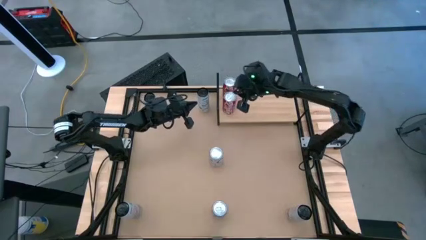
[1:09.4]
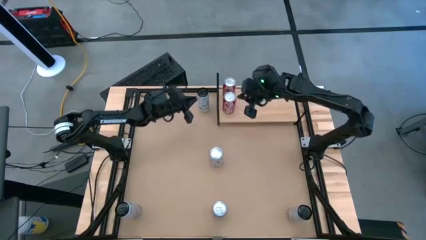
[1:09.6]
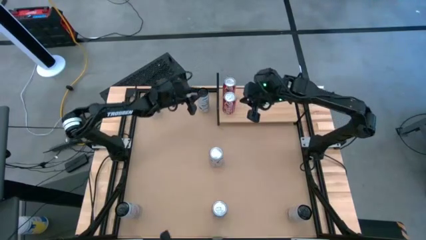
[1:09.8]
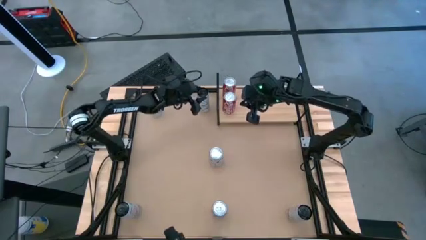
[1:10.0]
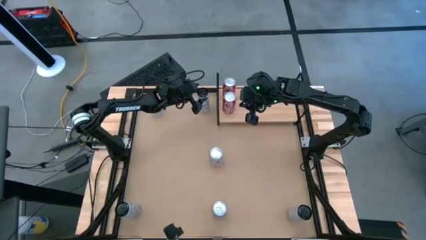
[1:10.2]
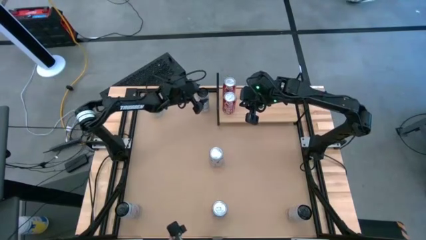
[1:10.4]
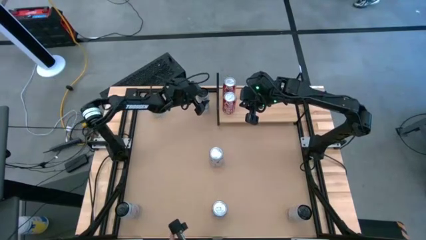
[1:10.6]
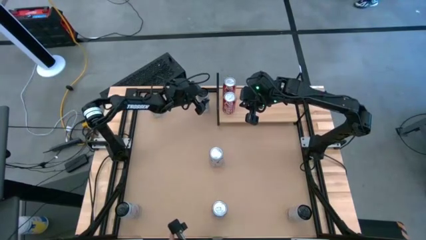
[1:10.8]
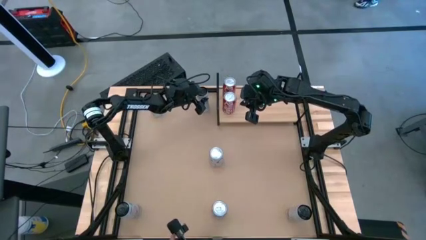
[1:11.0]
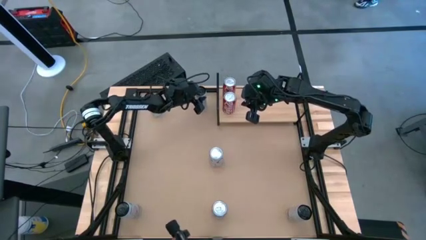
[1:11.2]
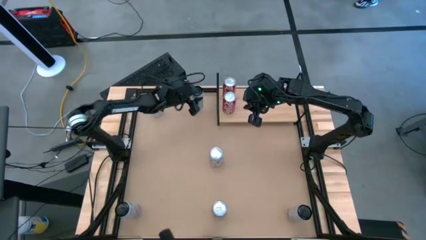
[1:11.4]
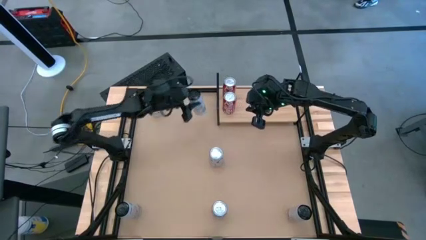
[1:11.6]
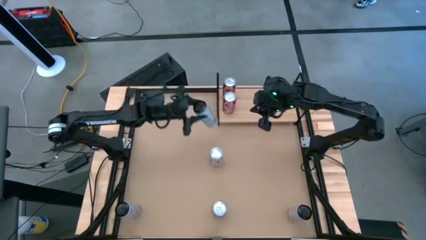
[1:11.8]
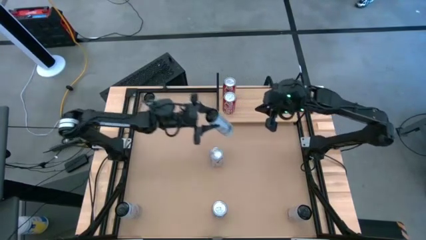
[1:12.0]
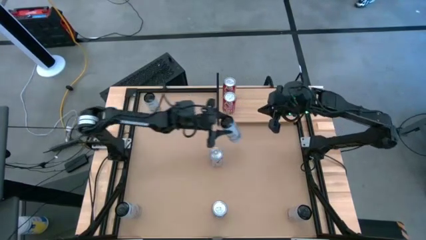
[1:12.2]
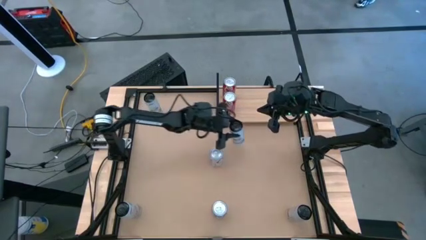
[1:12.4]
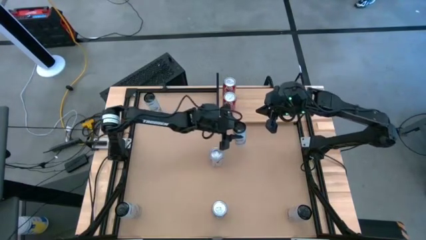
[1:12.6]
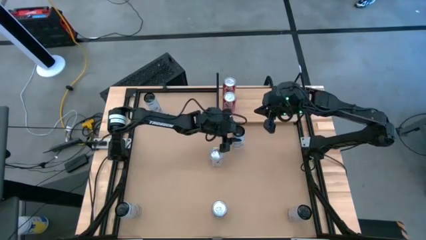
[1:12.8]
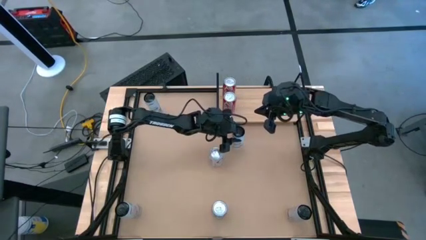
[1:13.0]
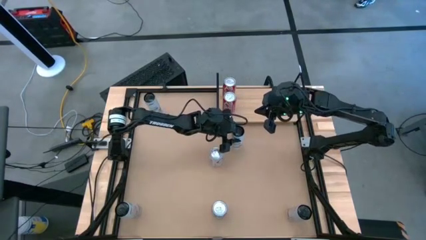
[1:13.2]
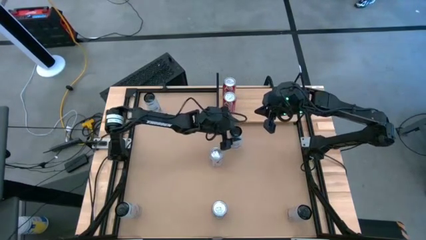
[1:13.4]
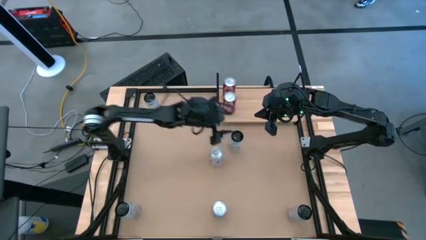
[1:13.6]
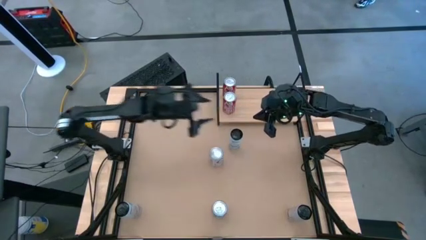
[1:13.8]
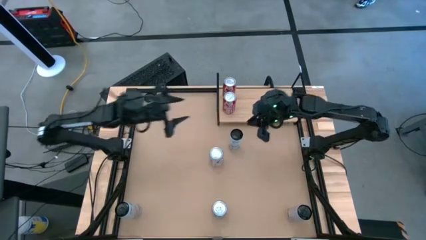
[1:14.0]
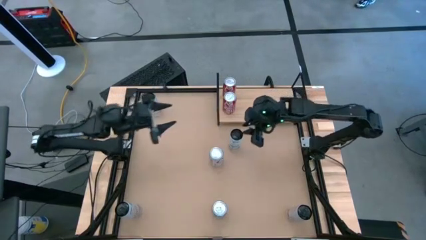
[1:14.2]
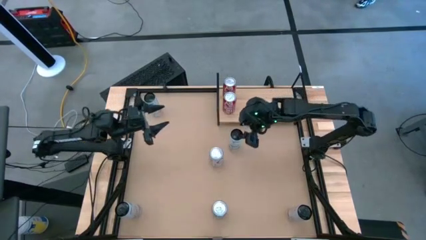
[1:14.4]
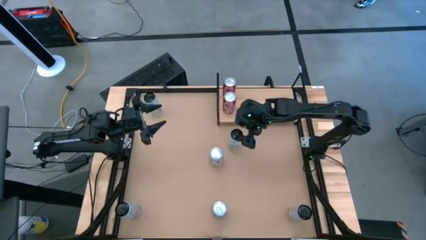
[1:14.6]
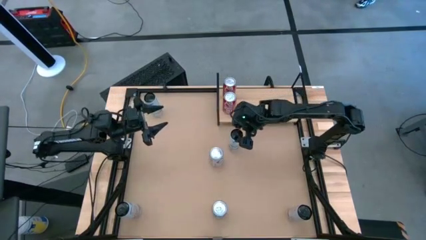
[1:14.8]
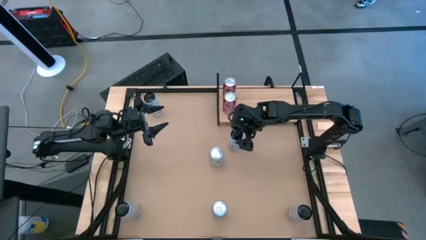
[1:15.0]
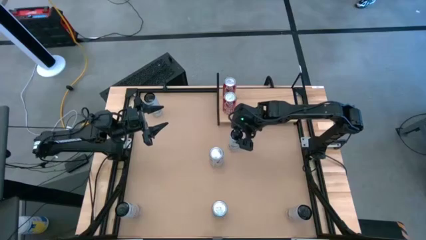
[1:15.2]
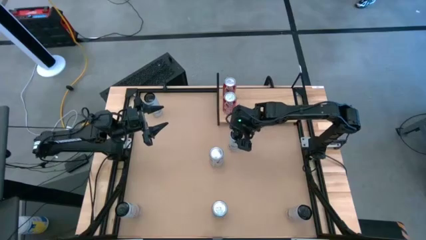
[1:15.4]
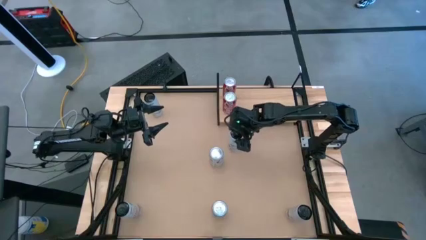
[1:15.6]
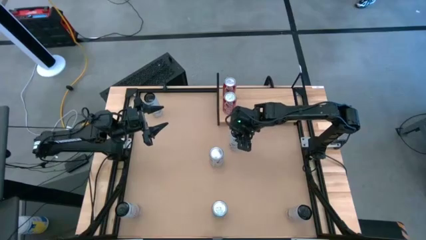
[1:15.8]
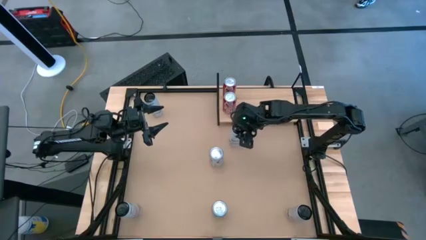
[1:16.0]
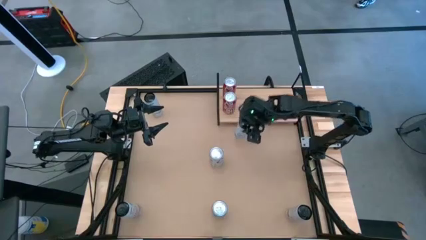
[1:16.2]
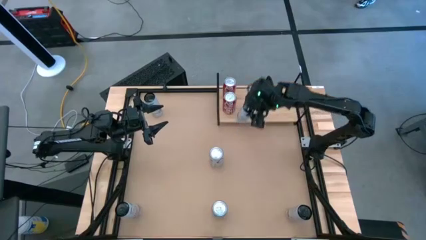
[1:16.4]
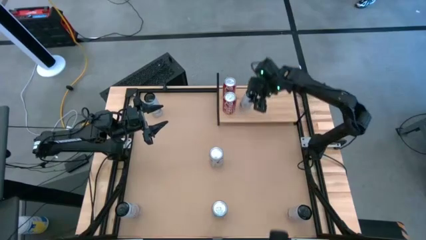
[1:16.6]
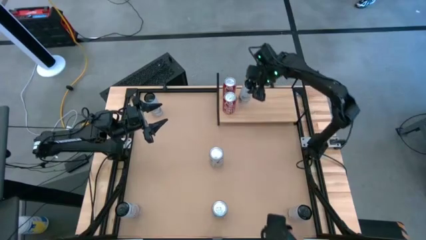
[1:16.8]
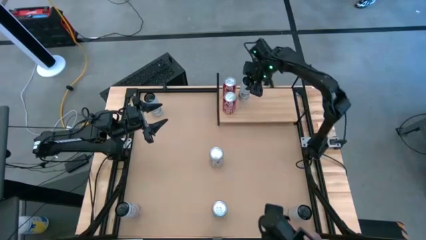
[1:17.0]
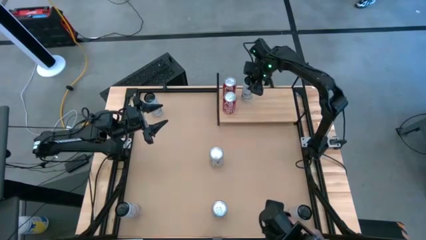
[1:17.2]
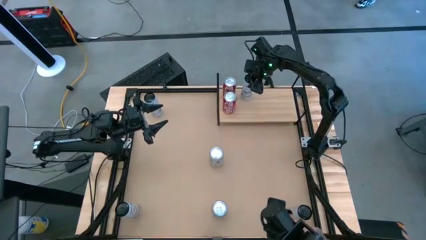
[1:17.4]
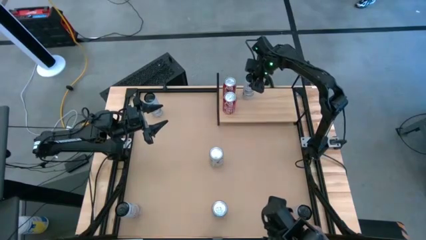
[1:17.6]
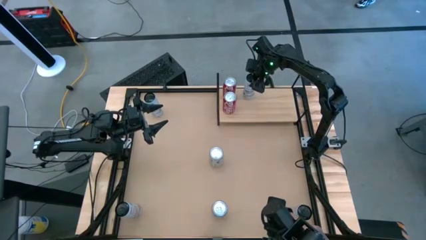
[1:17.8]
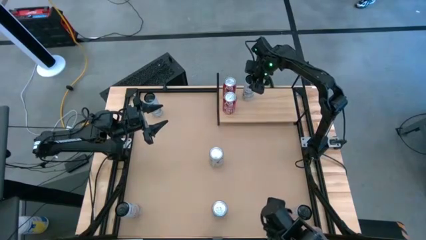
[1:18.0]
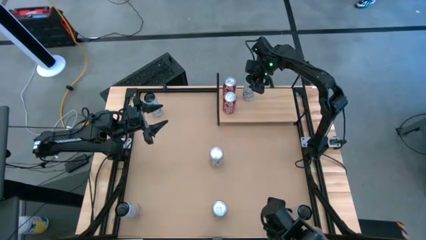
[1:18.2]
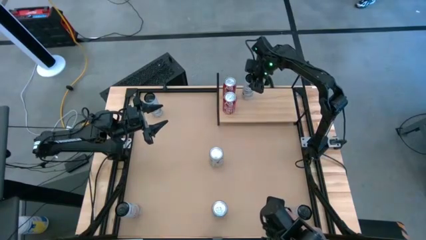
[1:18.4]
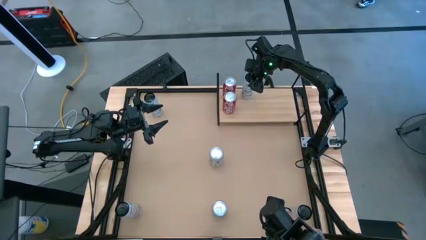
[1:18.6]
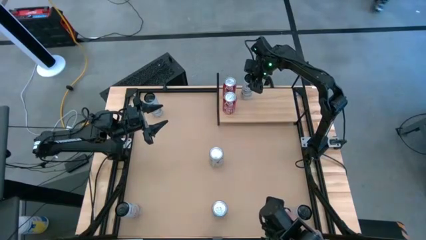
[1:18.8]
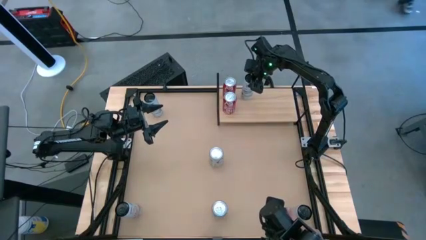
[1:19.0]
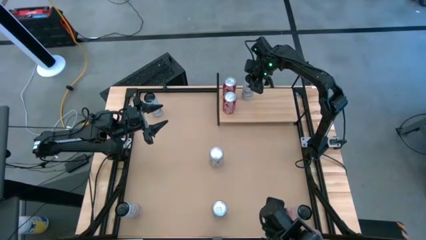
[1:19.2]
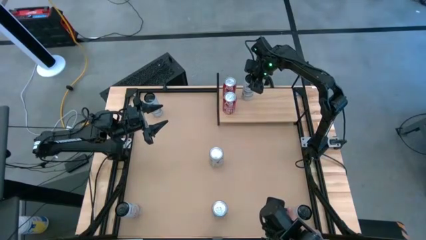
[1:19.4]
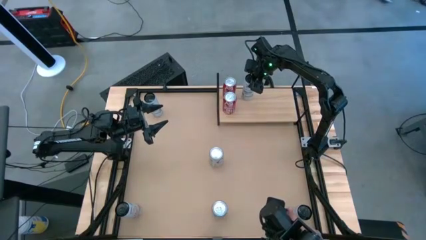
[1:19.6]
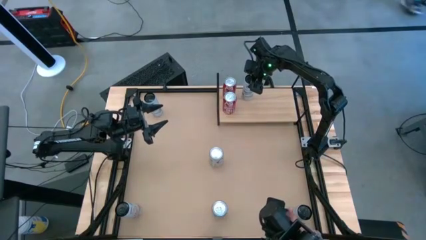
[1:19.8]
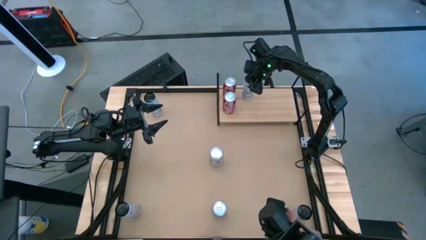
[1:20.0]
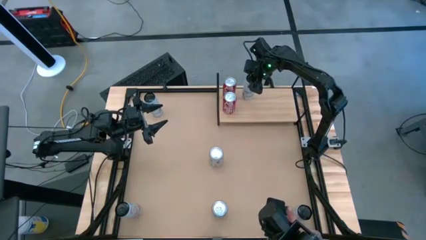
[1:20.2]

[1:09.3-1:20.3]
Task: Place canned beverage on shelf
Put the right blue soda can on the shelf

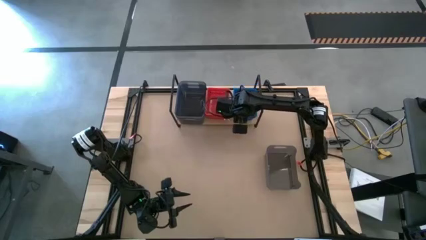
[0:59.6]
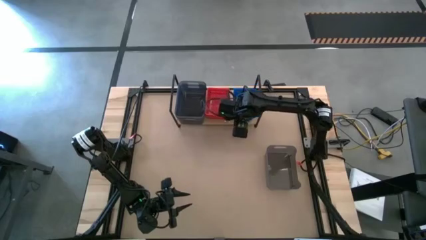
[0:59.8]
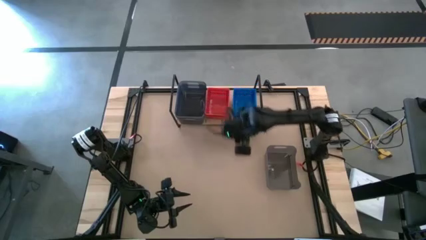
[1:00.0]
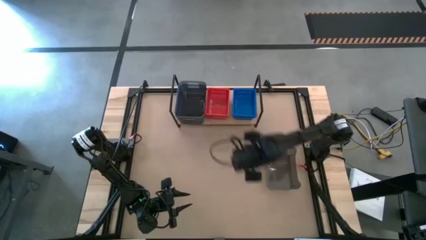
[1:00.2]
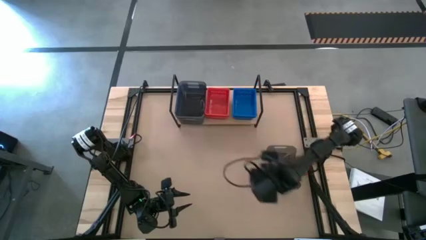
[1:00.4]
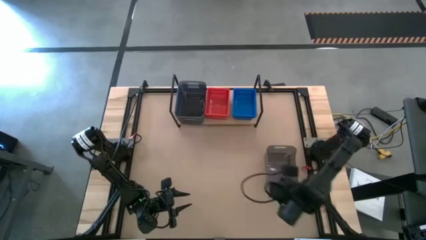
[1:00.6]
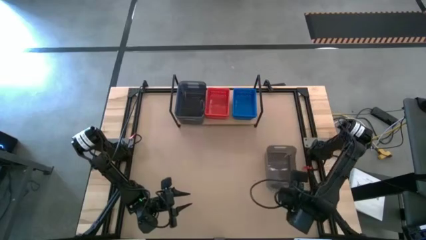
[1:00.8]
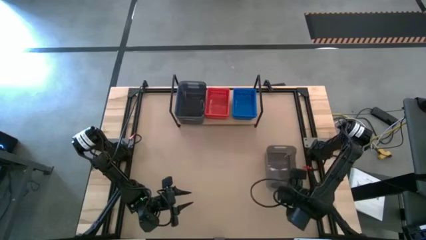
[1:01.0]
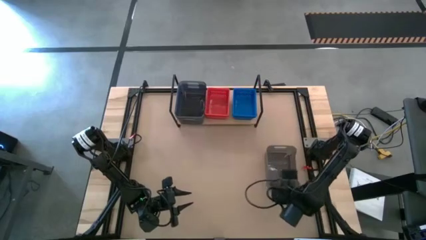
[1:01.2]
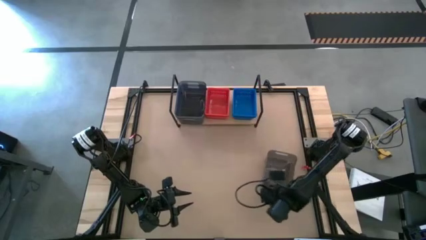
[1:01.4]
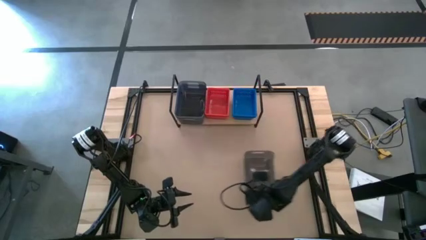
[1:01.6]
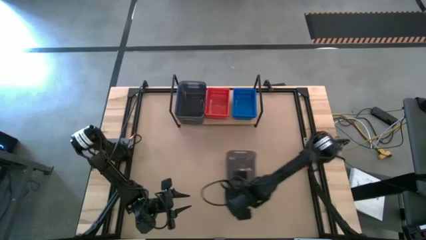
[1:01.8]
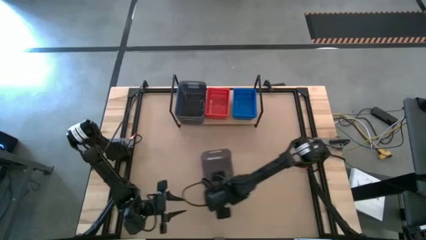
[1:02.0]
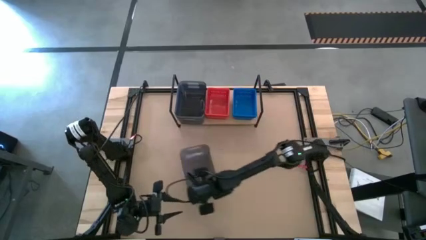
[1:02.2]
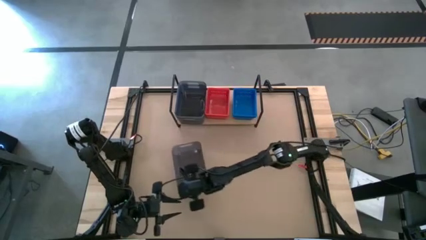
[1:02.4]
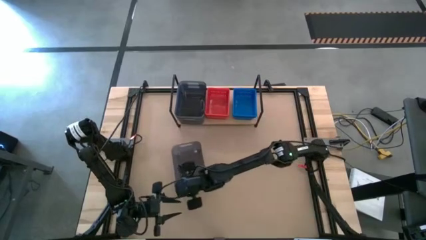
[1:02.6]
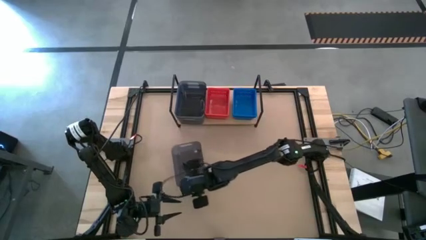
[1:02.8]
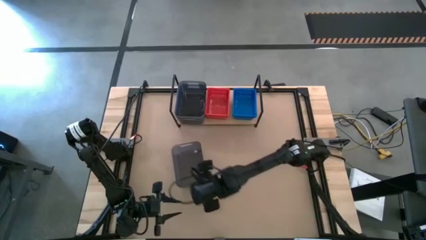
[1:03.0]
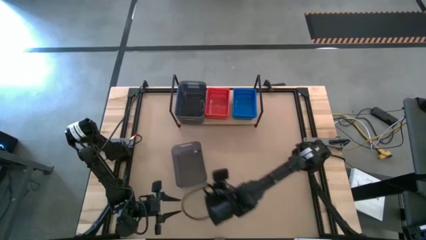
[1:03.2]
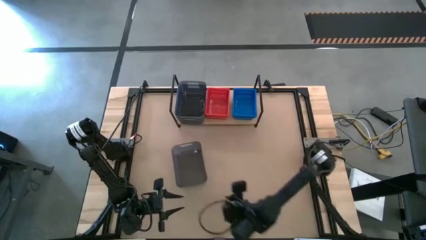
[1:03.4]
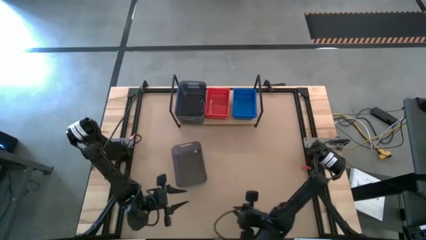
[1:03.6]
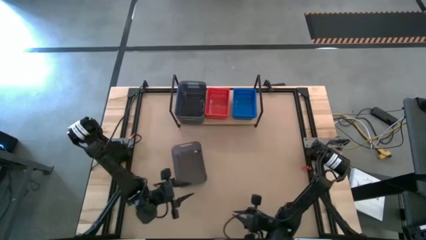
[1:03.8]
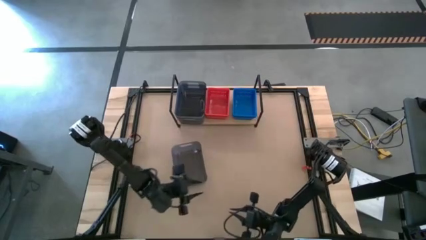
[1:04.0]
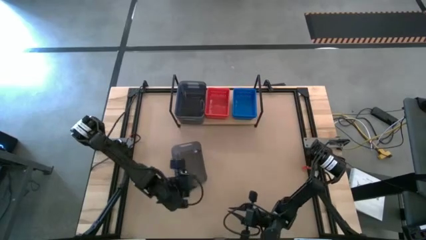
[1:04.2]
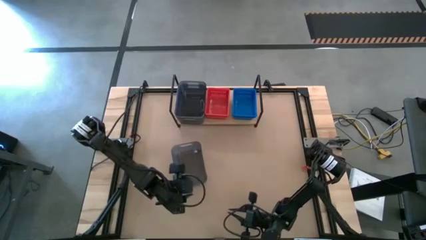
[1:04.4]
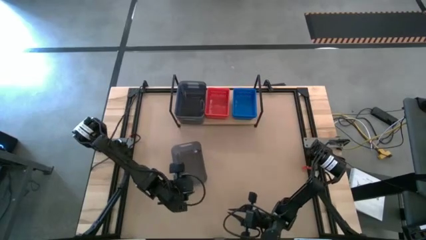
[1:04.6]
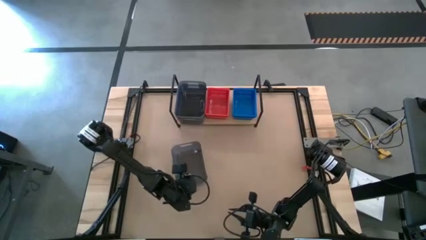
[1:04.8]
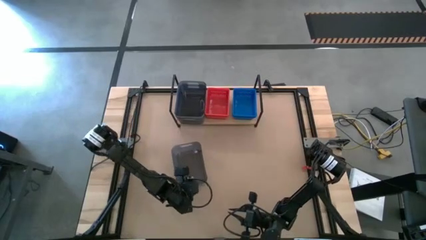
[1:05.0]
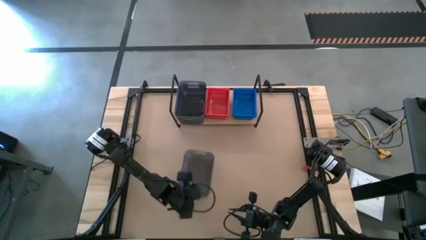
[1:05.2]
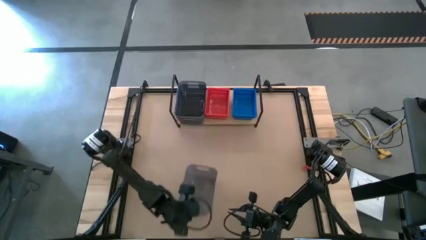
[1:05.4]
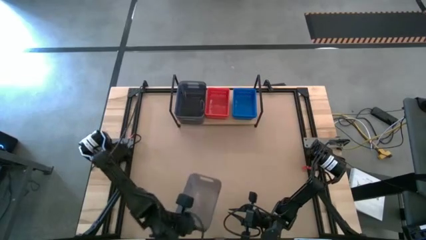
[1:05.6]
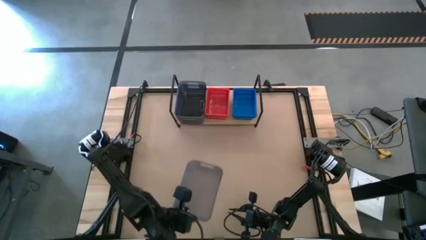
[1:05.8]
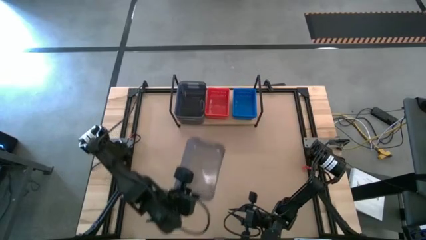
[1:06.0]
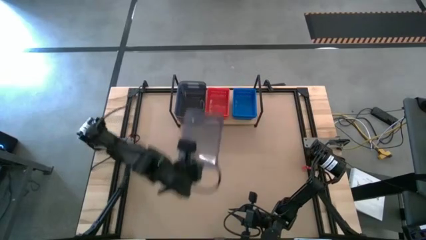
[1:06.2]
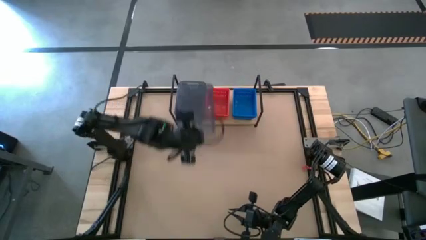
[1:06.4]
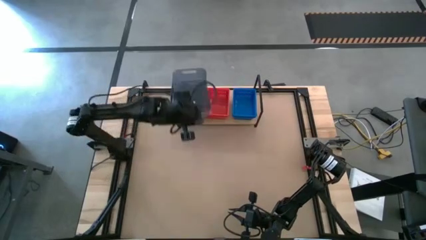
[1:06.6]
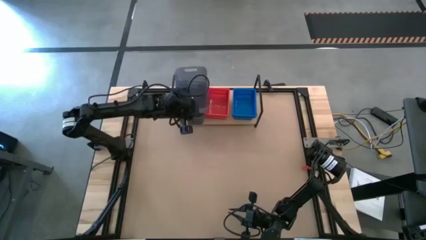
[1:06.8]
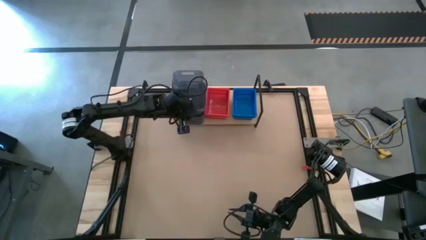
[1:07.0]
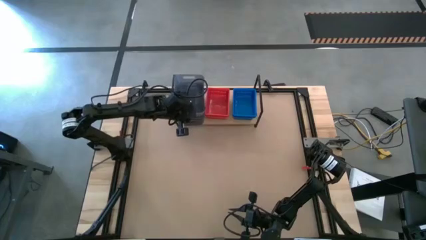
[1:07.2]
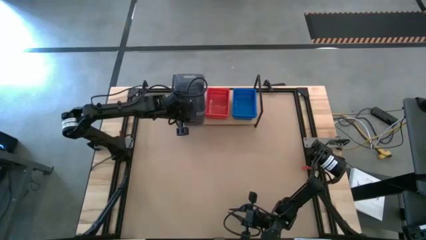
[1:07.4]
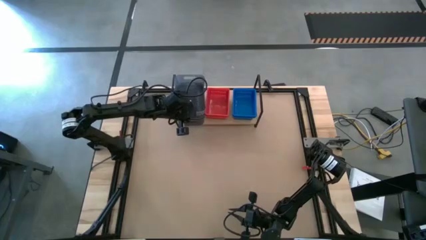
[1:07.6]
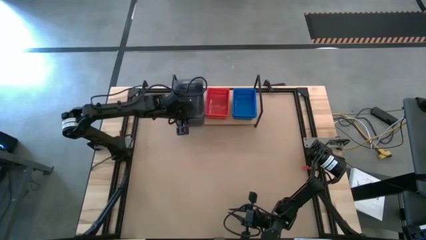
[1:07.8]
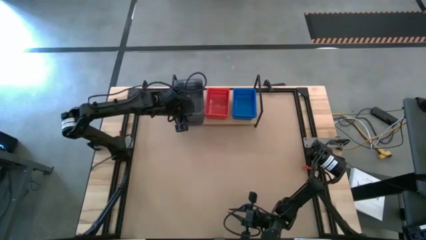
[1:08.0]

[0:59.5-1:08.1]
Task: Stack baskets on shelf by color
Stack the black bin on the other black bins on the shelf
